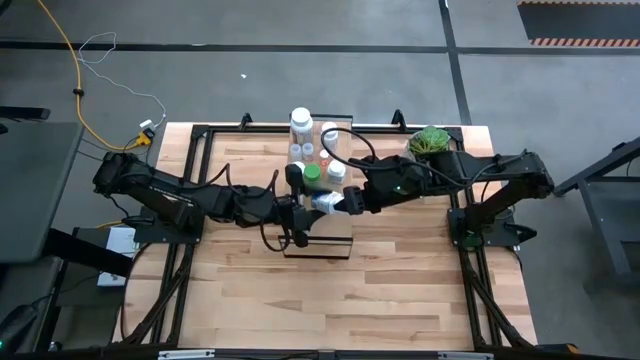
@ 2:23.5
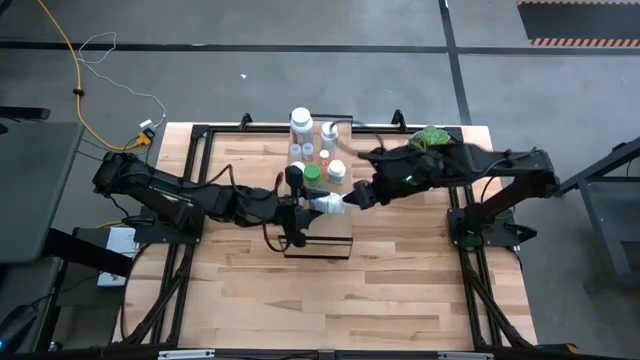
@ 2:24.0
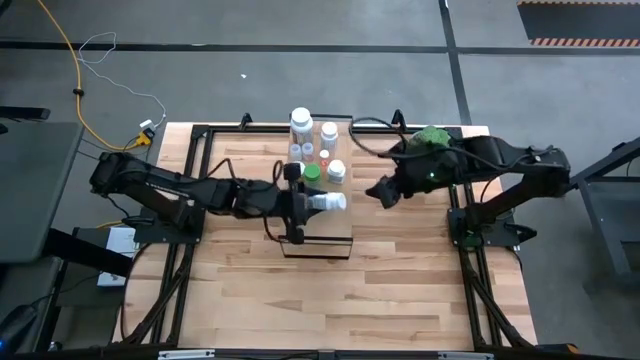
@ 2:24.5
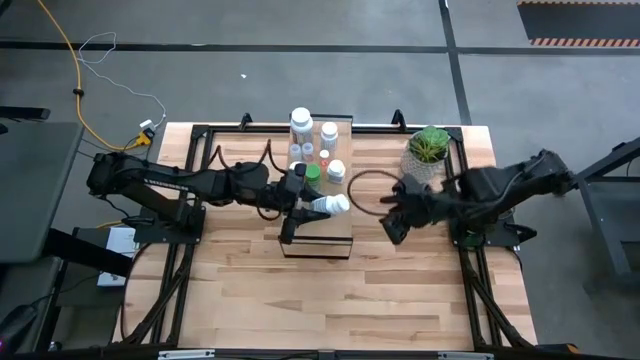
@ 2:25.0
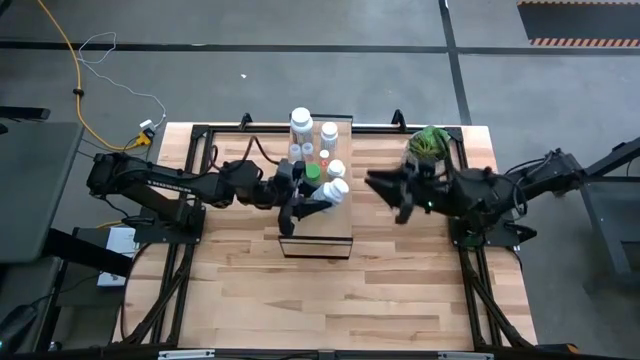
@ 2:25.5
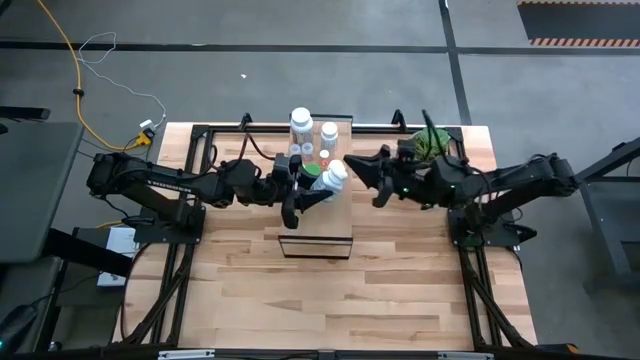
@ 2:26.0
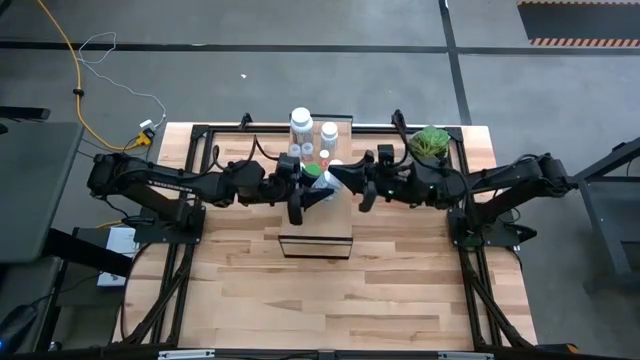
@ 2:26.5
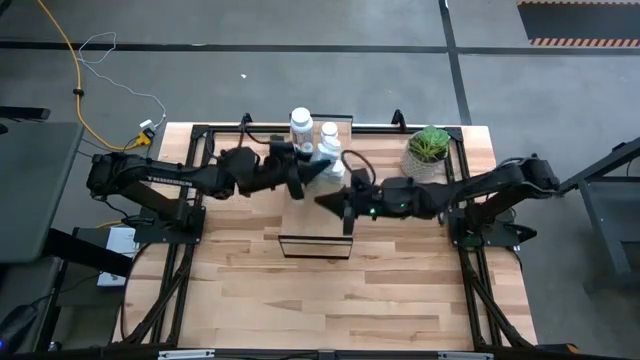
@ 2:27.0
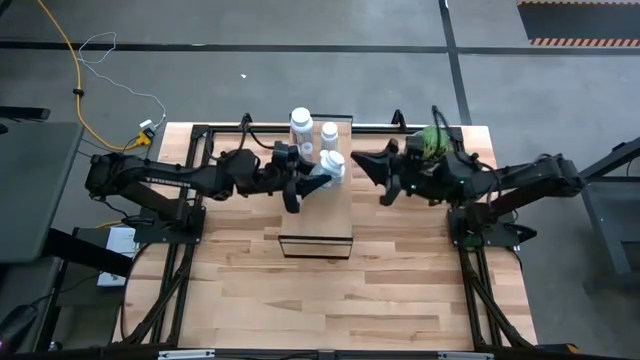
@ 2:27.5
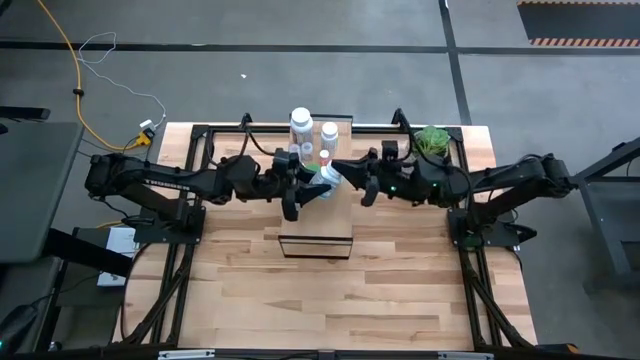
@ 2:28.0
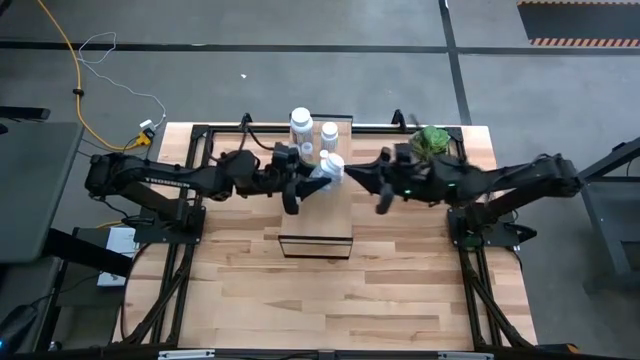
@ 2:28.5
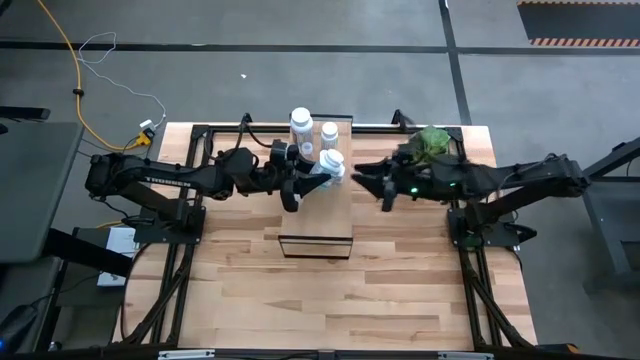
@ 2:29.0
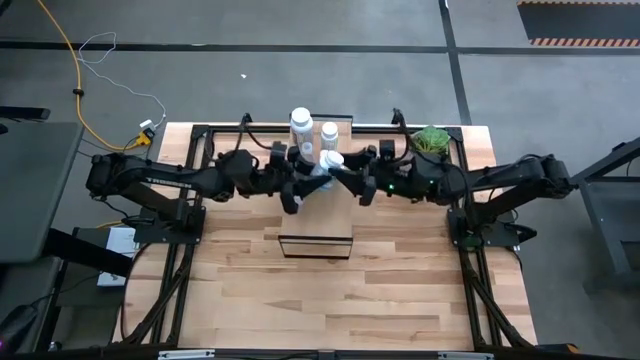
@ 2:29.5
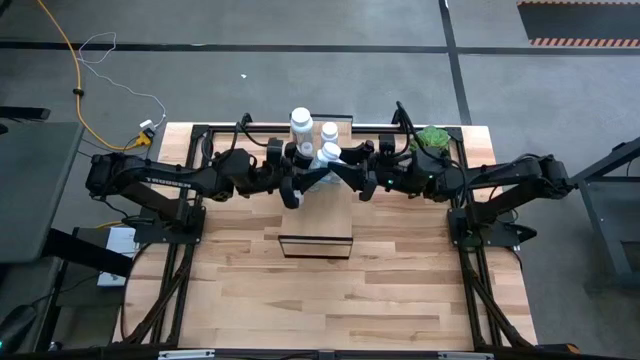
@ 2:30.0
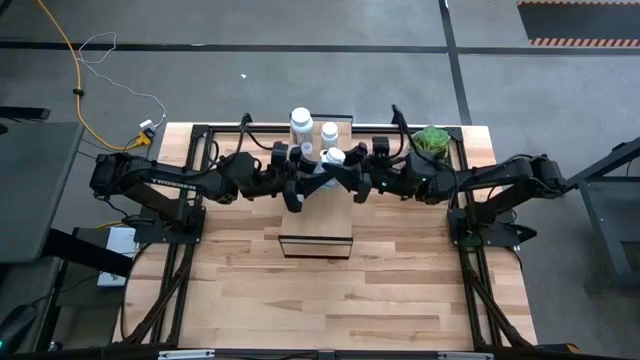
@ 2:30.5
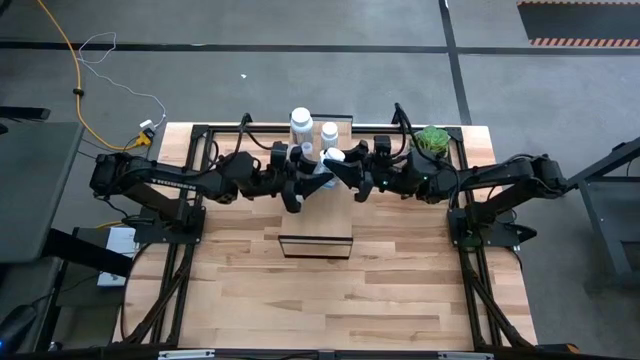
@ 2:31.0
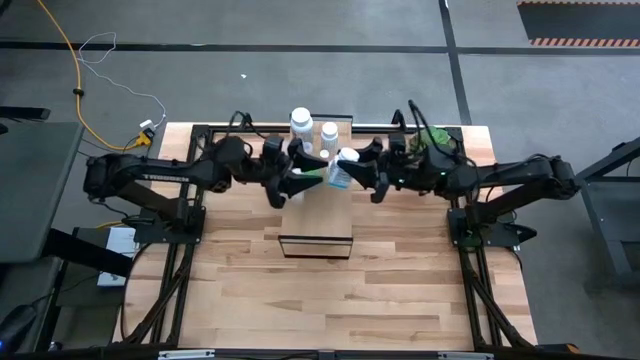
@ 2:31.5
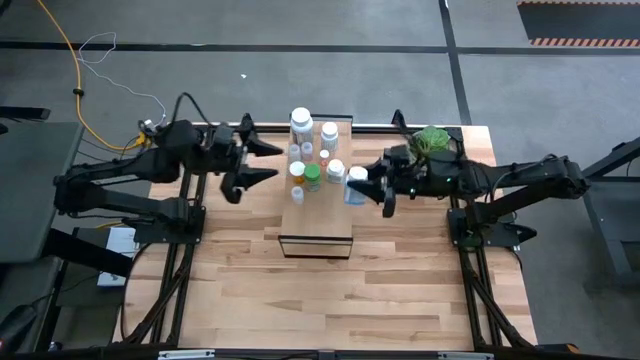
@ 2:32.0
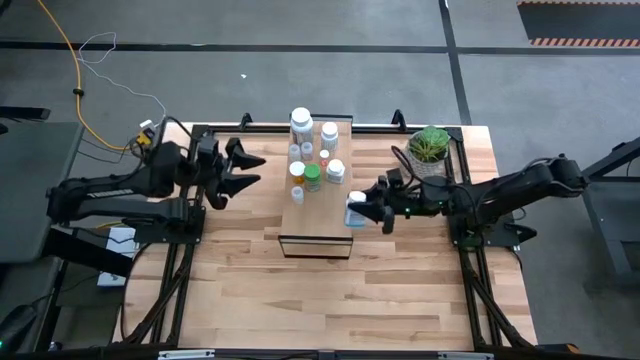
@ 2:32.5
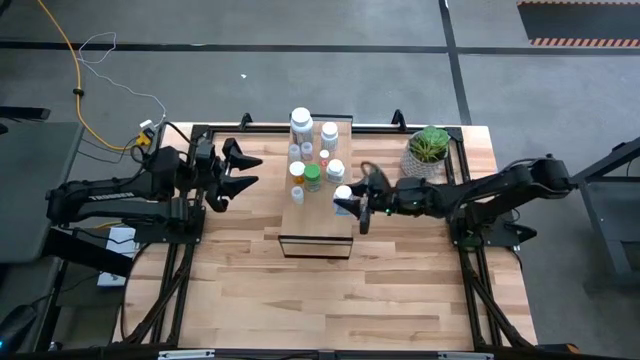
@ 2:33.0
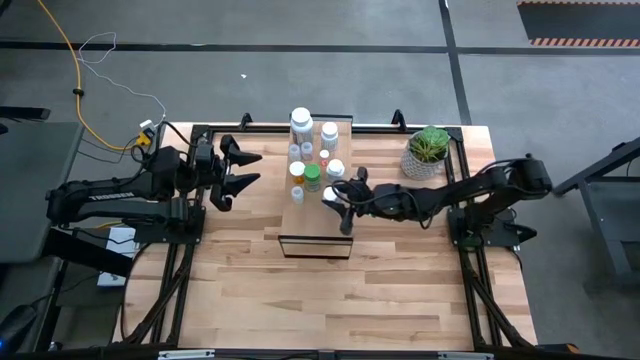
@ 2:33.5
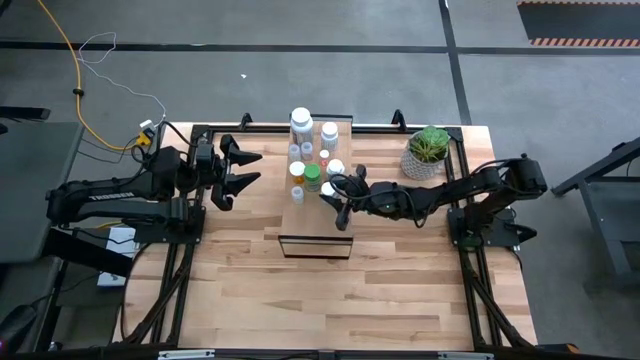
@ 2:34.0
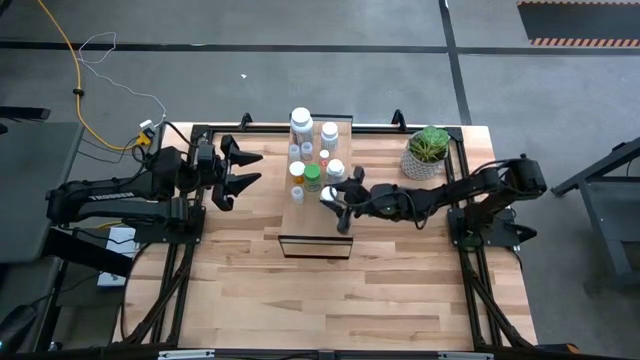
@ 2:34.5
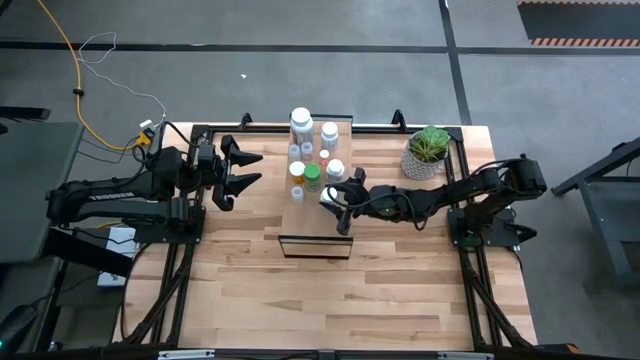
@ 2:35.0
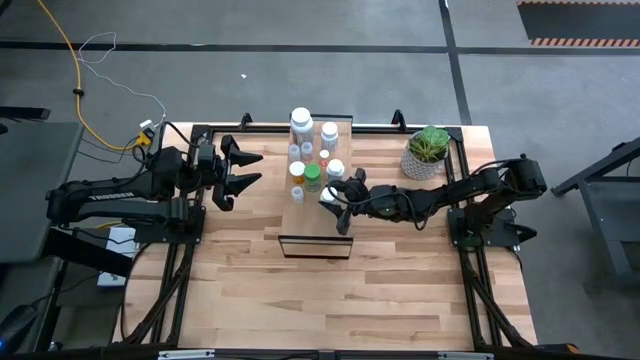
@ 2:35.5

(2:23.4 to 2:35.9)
Task: Pick and place medicine bottles onto shelf by color
Put the blue medicine bottle on the shelf

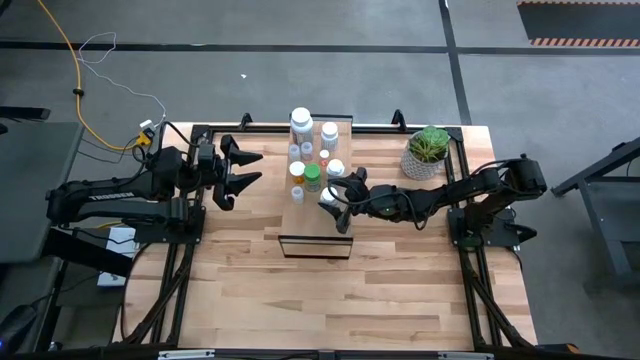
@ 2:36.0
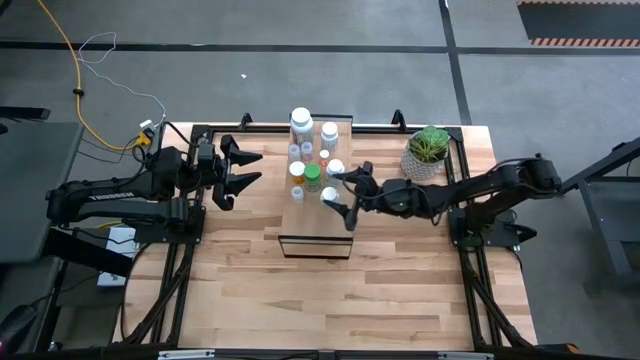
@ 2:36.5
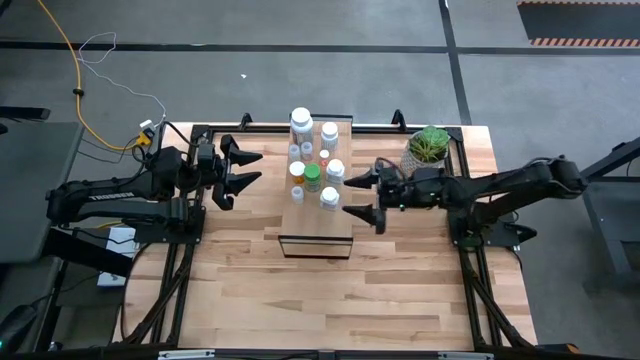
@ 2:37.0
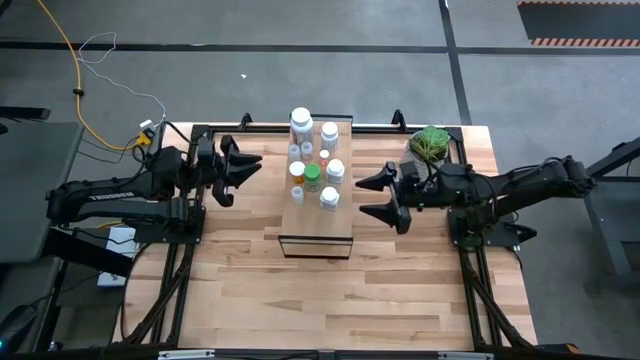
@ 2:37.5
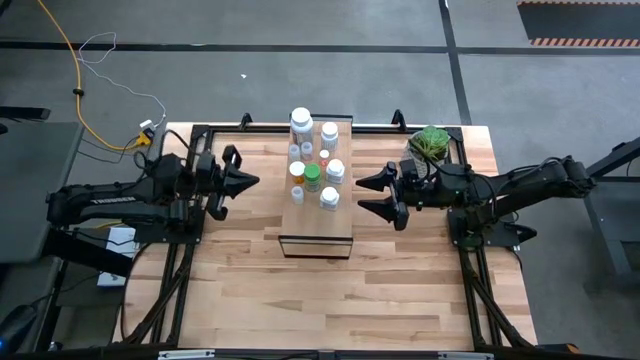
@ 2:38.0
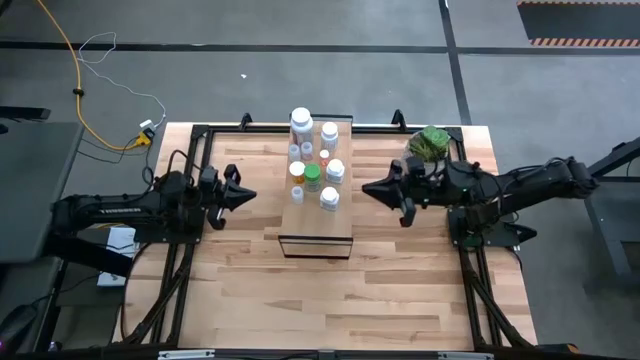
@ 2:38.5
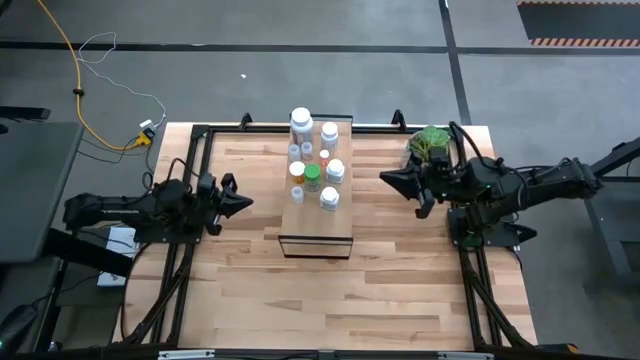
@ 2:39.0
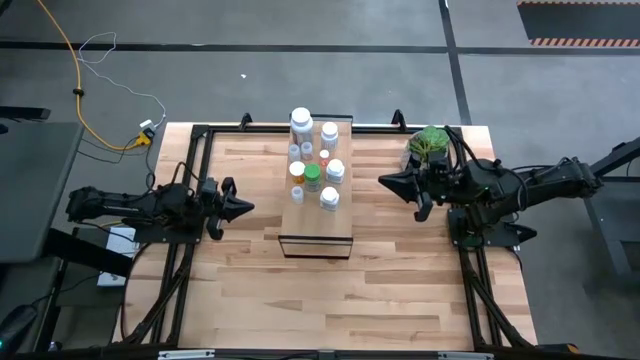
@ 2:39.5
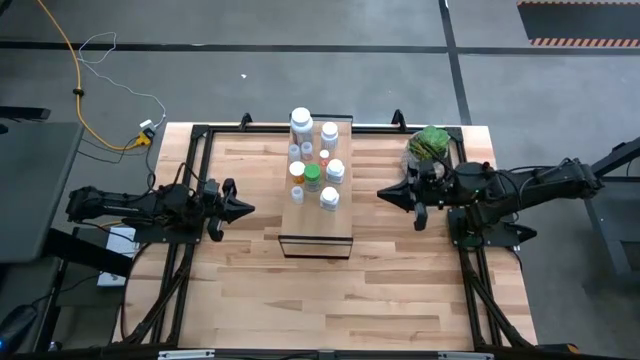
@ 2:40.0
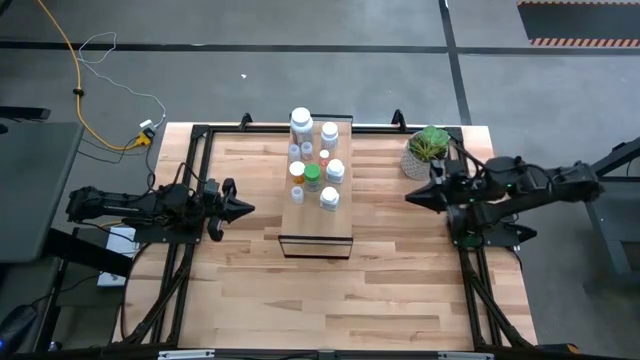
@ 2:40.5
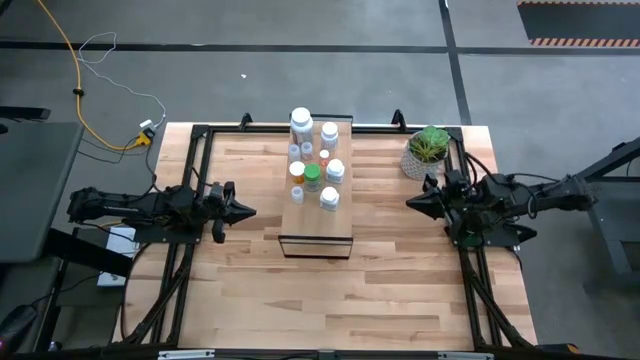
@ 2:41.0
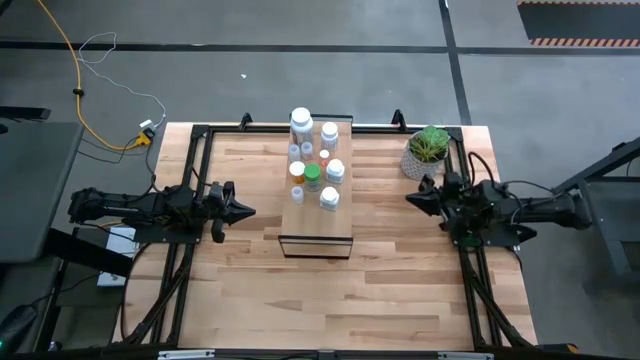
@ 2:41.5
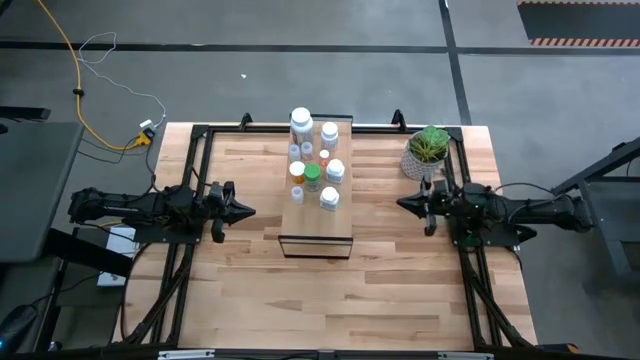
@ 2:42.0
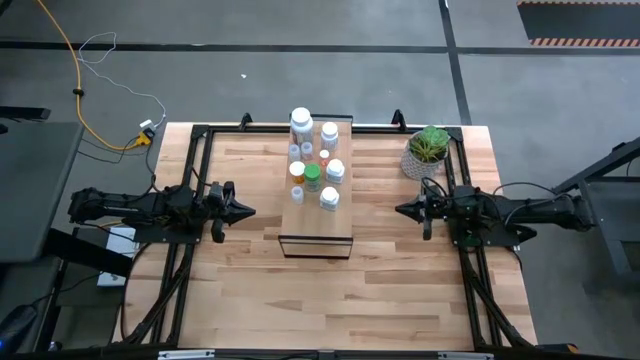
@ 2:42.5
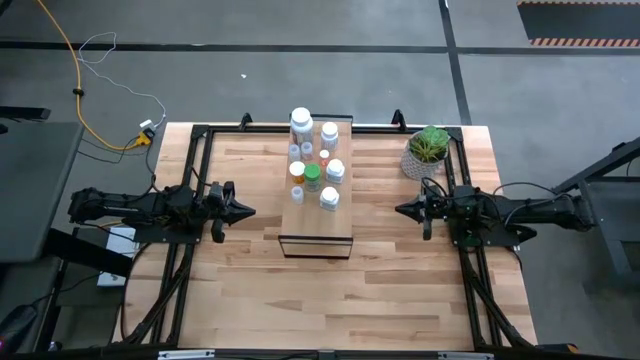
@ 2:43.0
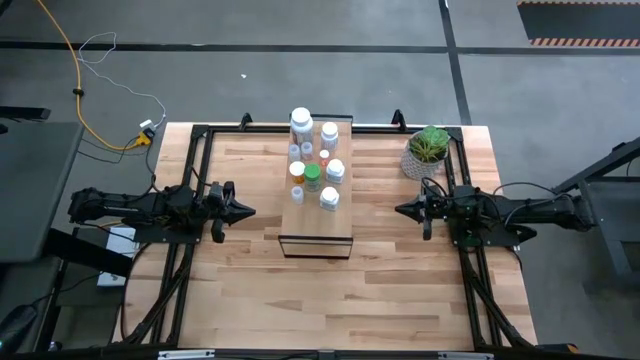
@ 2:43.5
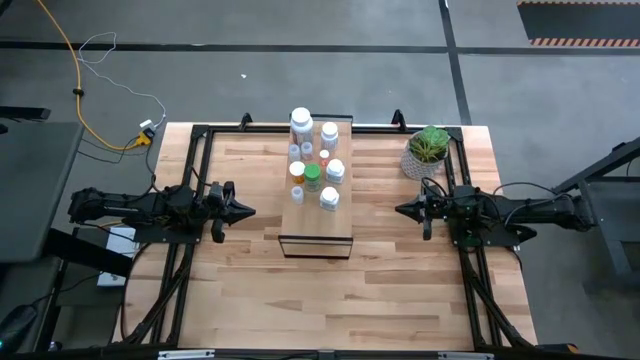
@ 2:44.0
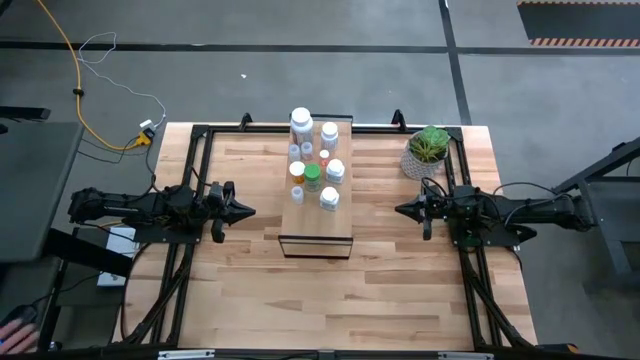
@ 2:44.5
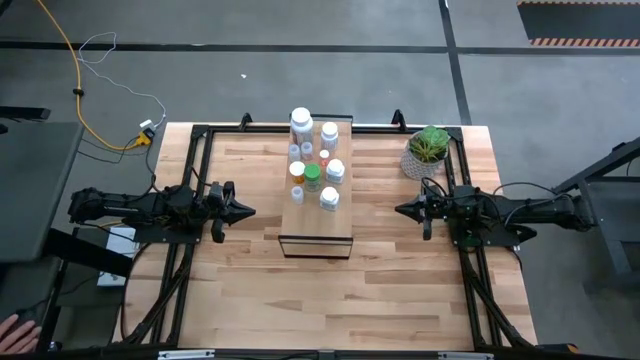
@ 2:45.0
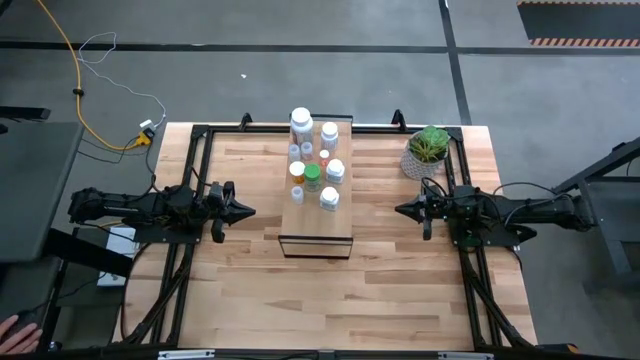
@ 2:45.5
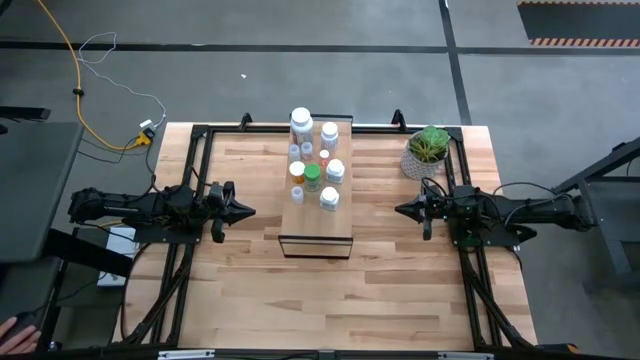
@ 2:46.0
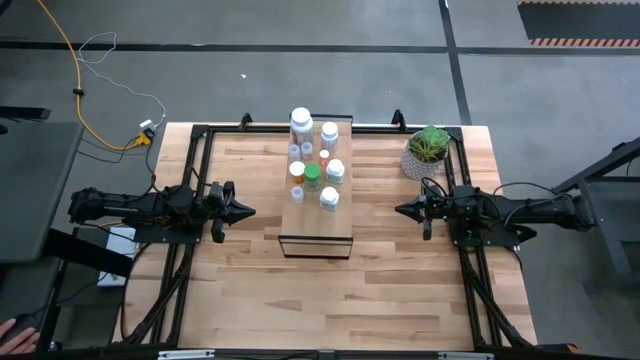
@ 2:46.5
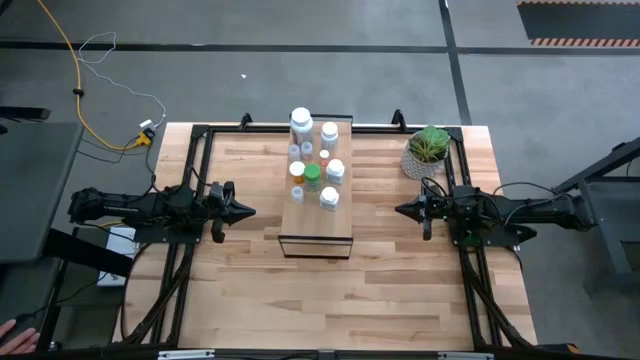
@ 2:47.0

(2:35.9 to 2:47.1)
Return to Home Position
